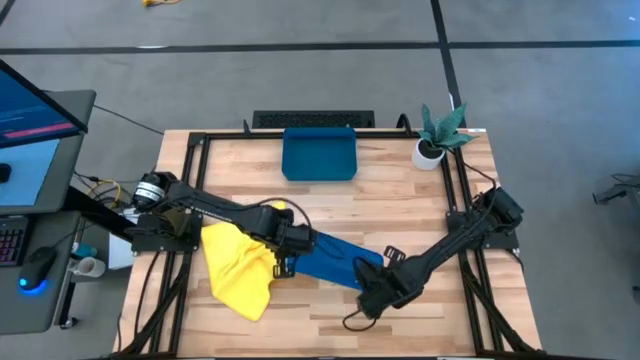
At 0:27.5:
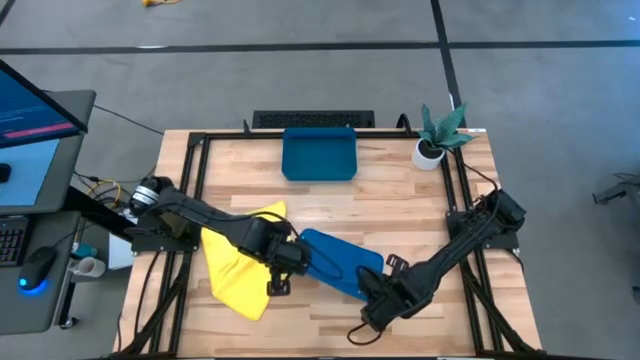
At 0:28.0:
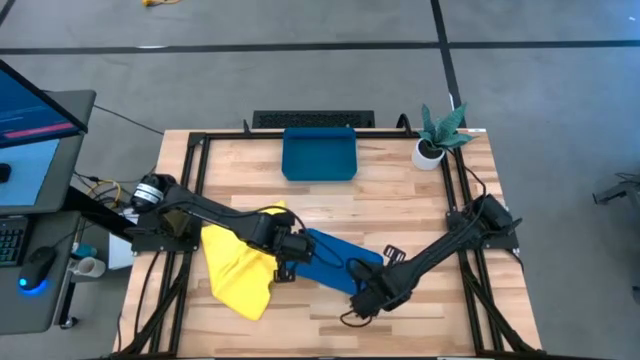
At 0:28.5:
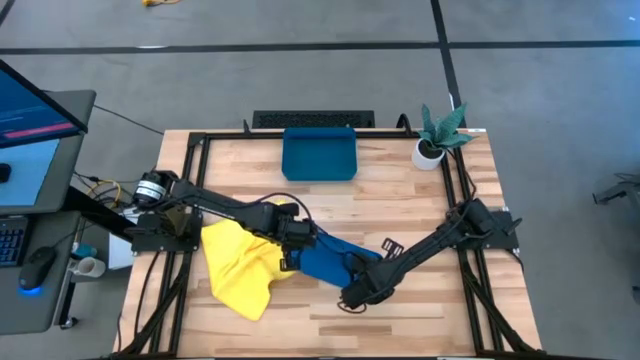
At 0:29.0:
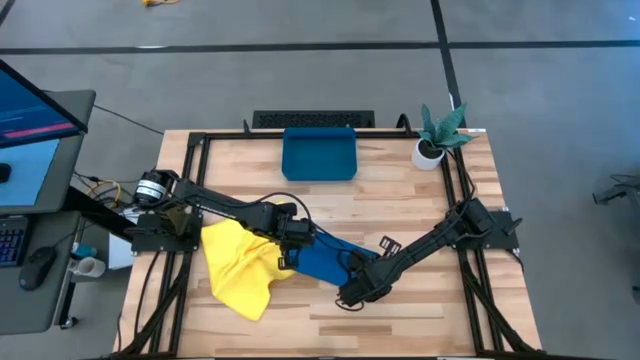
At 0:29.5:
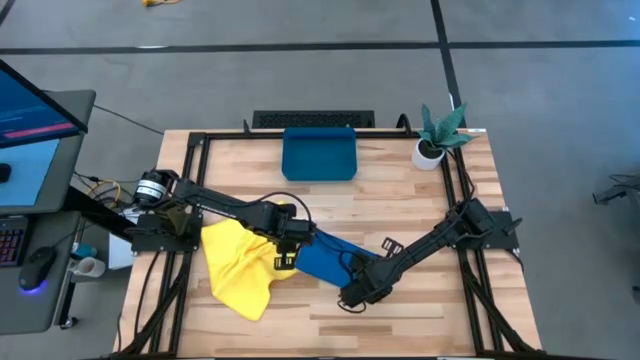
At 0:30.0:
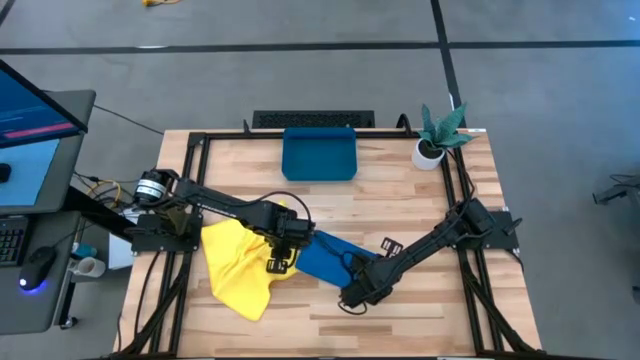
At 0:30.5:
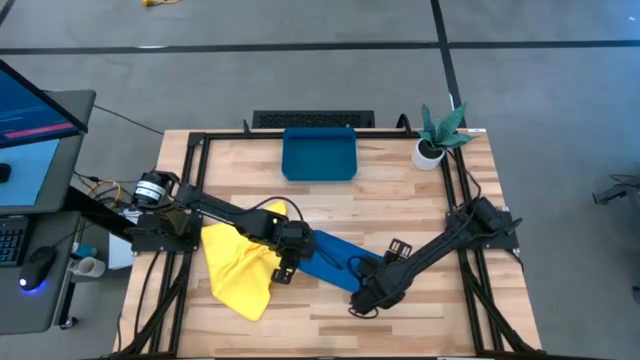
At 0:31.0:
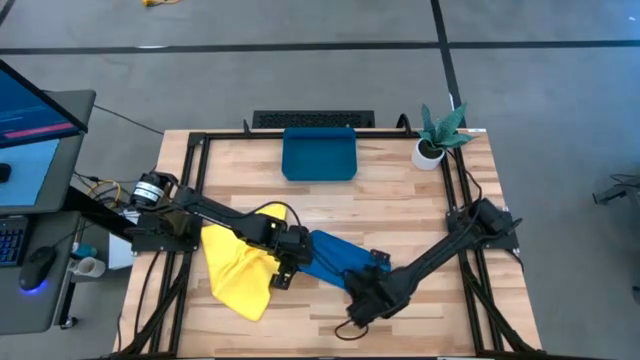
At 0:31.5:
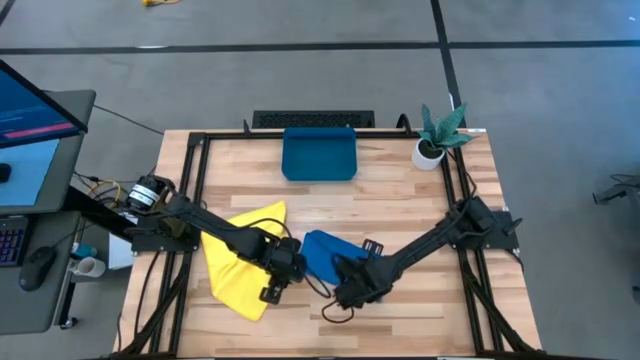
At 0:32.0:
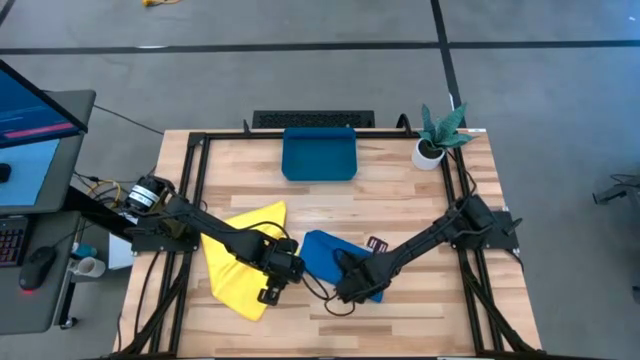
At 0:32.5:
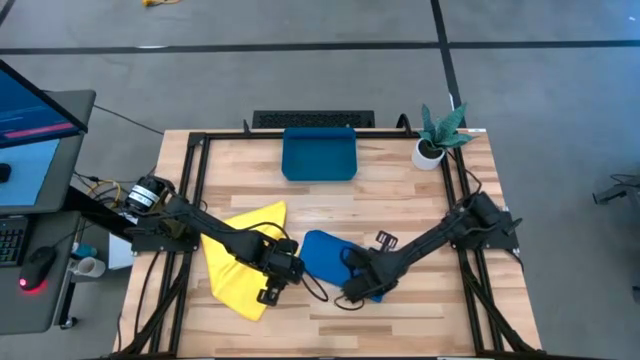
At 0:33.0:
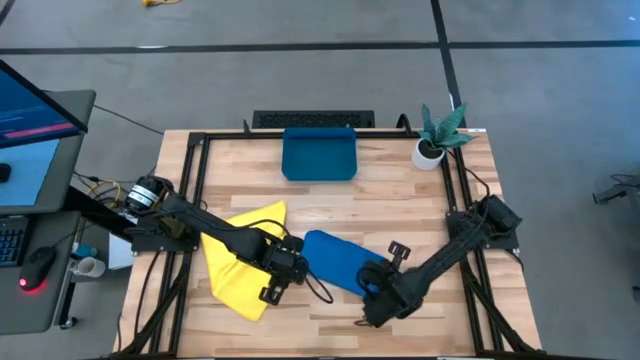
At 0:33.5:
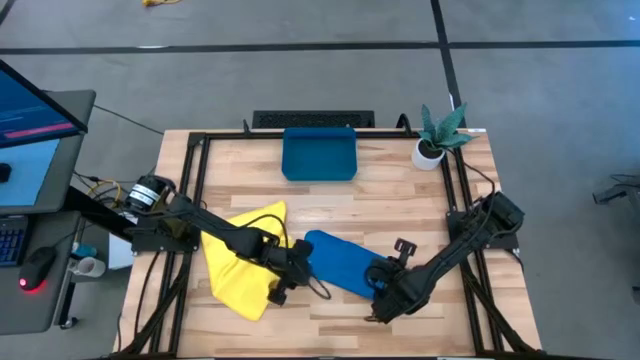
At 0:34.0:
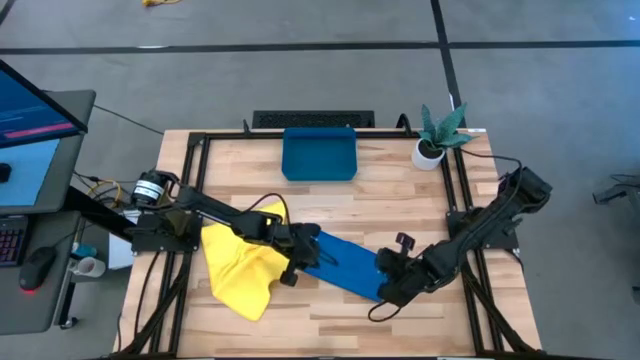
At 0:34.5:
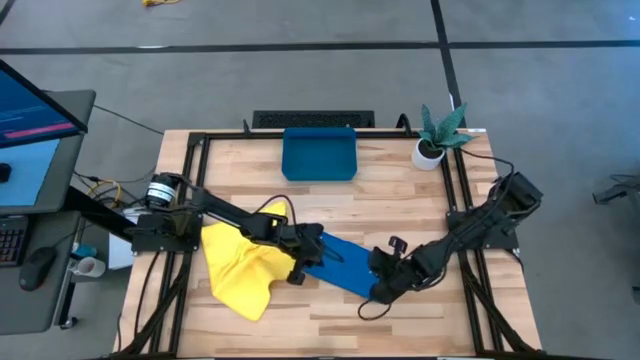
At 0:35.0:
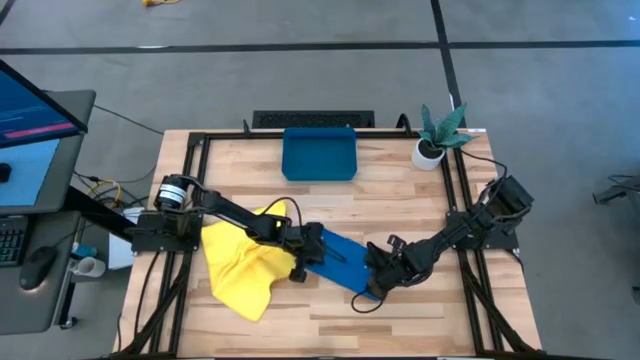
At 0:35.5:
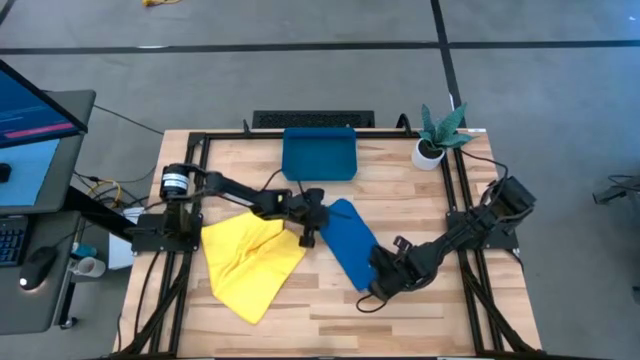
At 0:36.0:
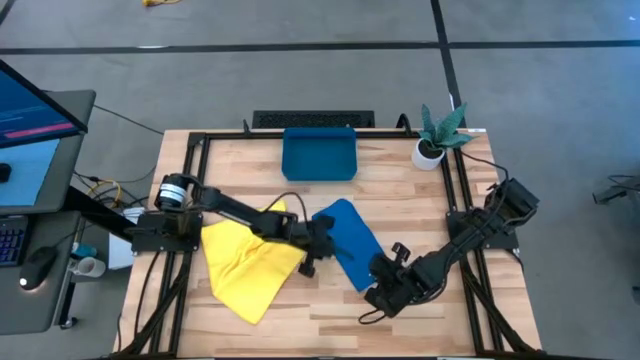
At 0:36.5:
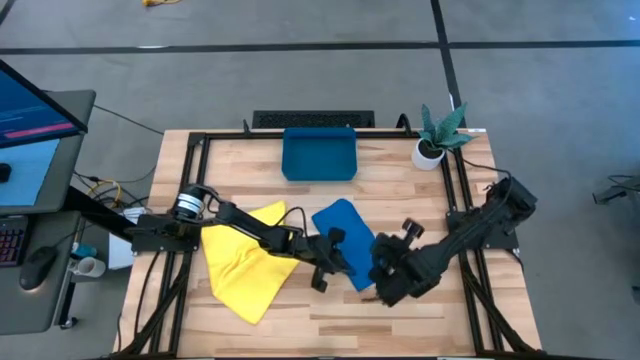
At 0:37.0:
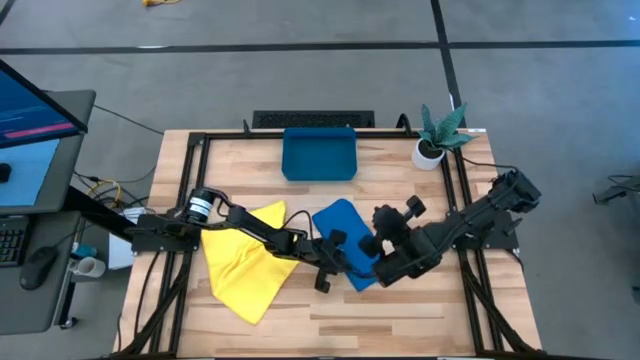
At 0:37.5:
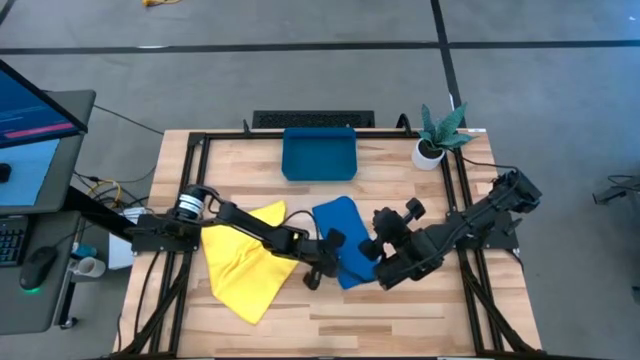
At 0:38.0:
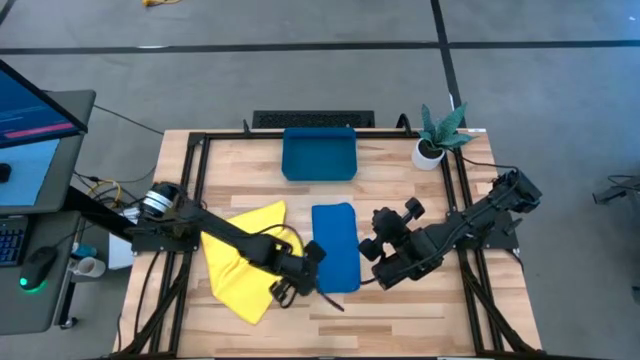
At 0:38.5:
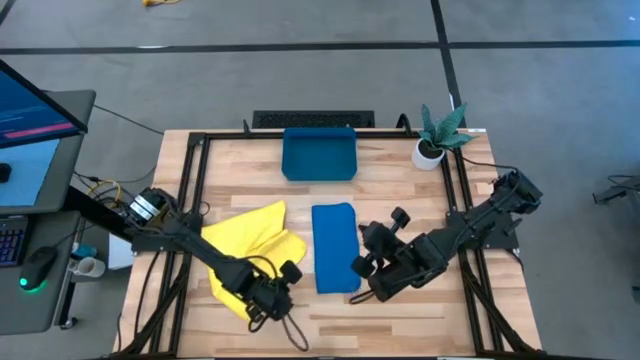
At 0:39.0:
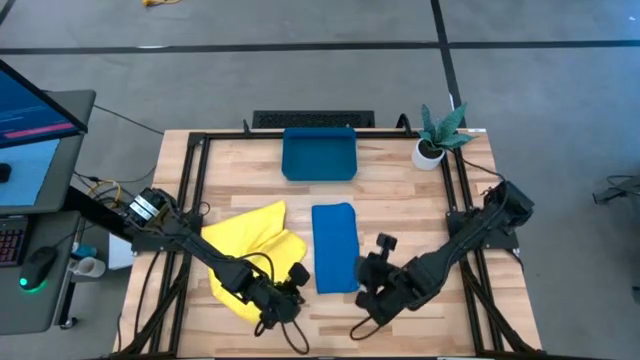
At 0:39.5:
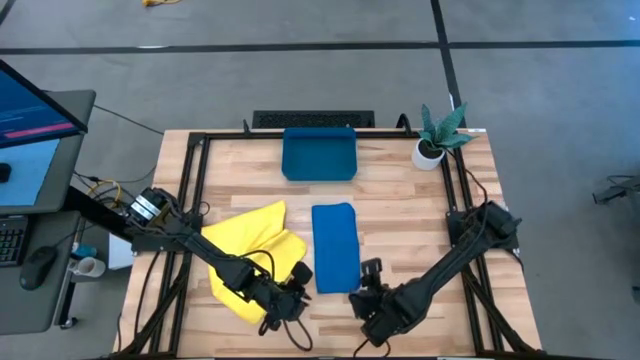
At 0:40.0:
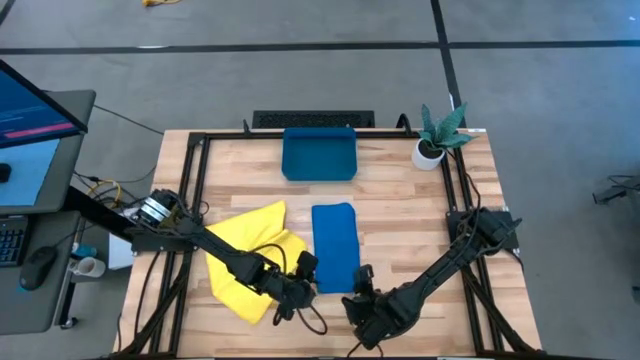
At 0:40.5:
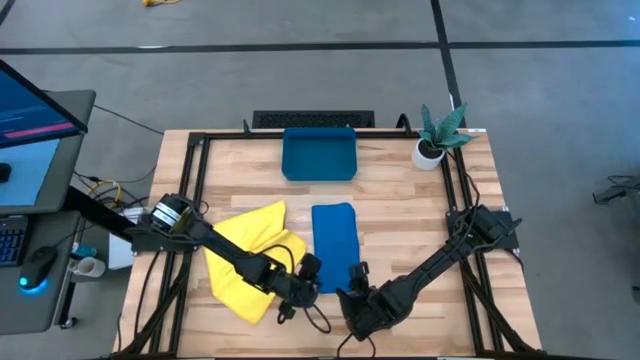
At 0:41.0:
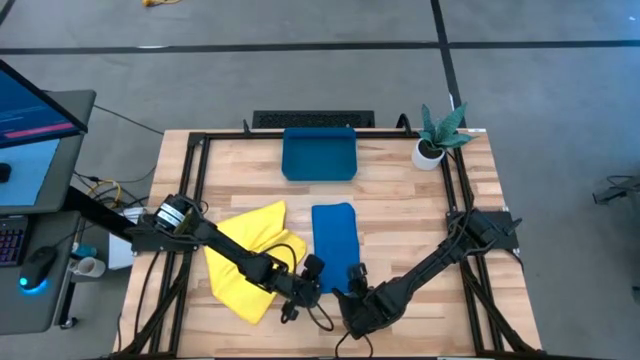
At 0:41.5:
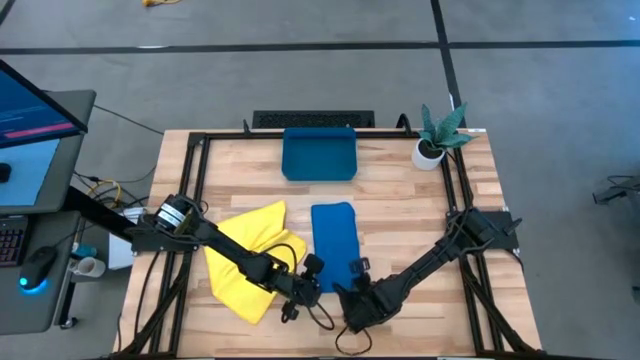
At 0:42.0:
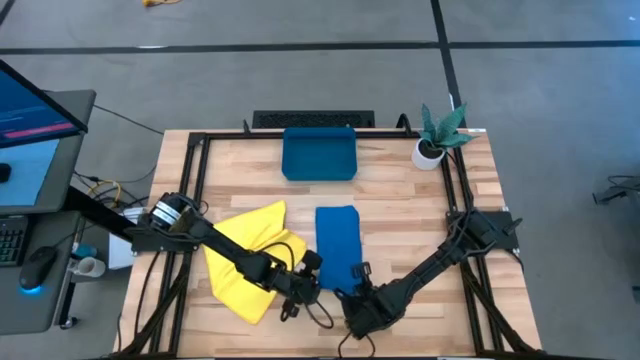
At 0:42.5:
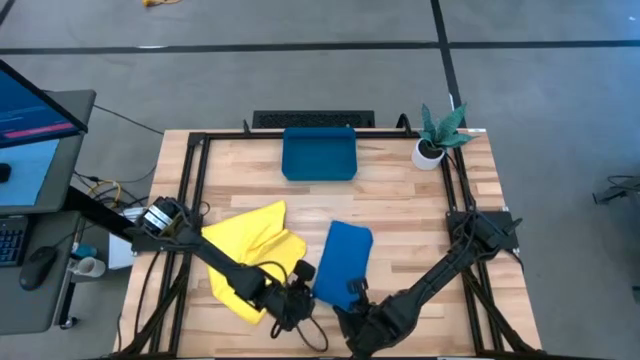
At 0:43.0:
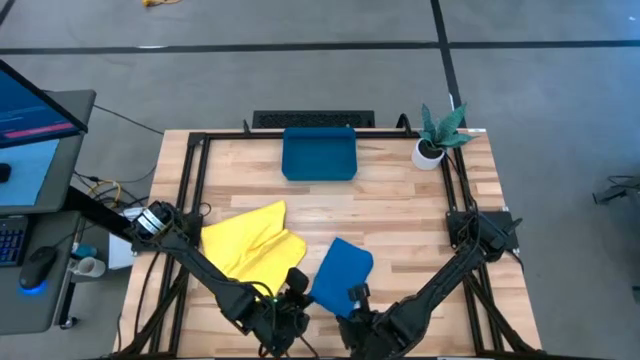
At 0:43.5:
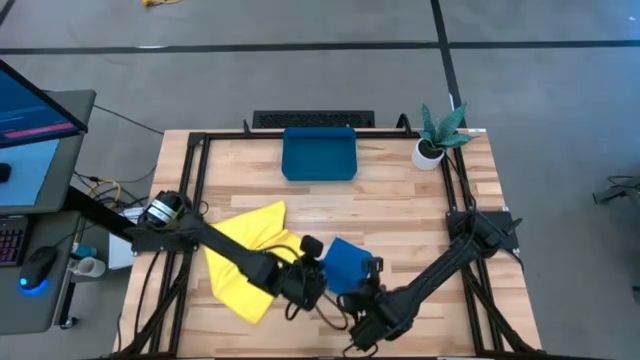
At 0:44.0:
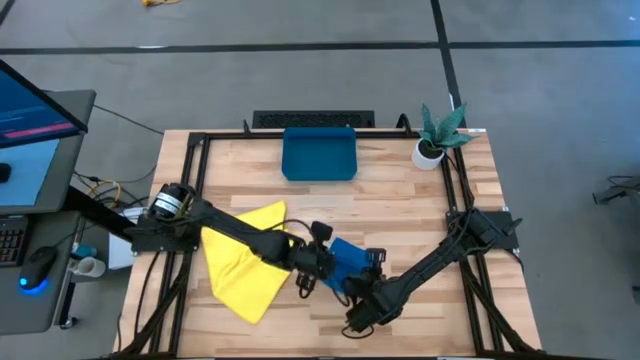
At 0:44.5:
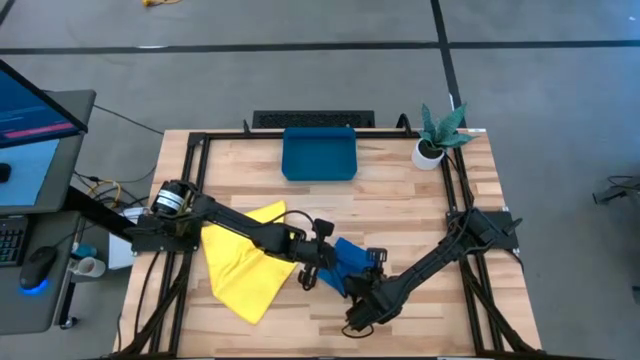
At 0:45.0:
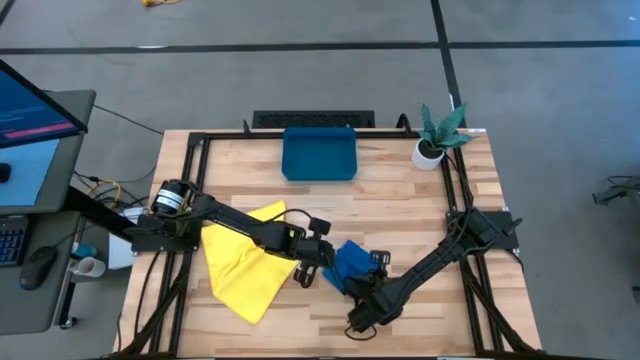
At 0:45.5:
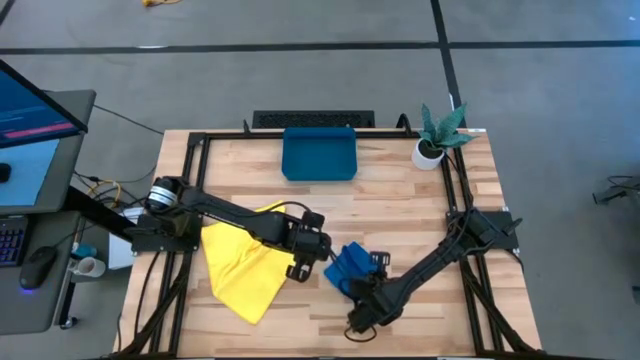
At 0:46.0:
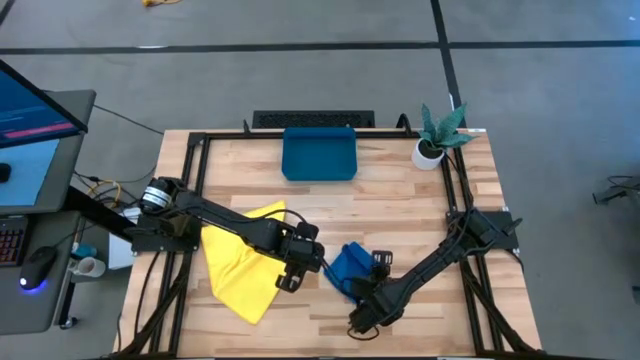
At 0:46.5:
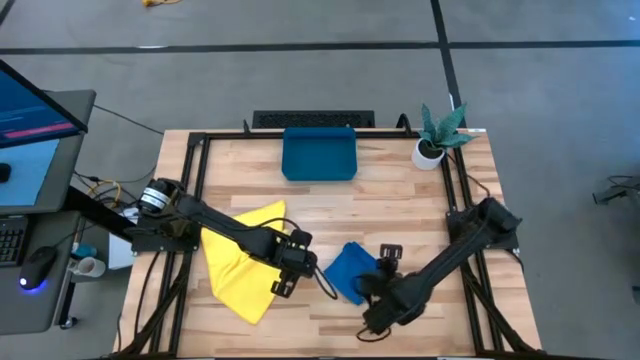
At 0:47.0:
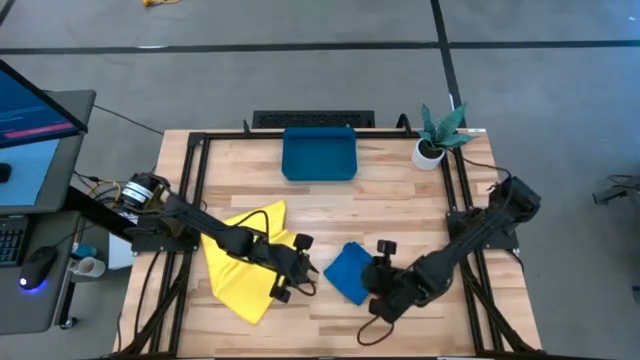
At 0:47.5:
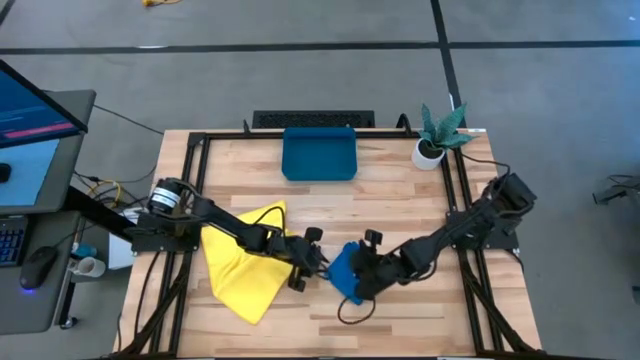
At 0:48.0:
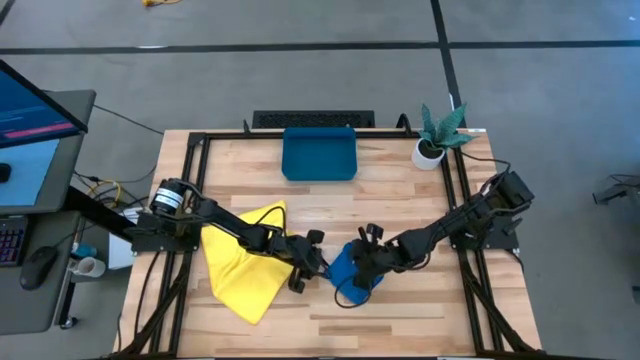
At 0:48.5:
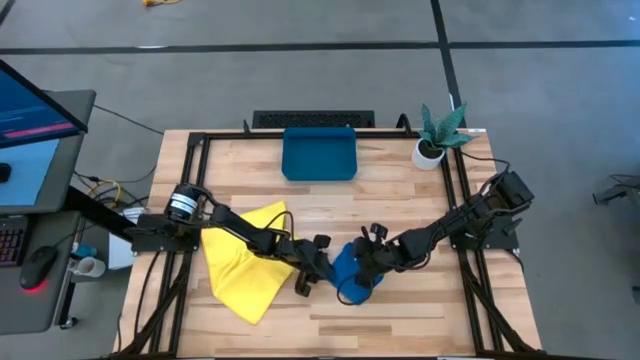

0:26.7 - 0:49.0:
Task: Roll microfiber towels into tight, uniform cylinder then place into a basket
Roll the blue microfiber cloth
